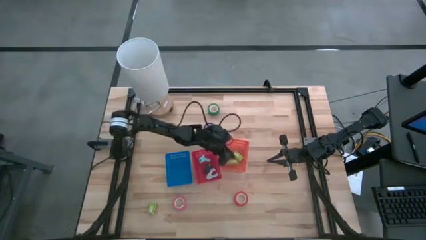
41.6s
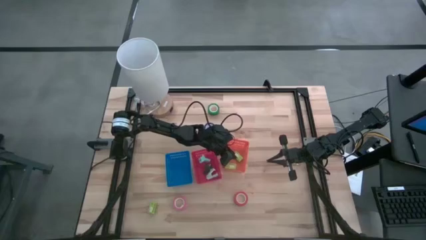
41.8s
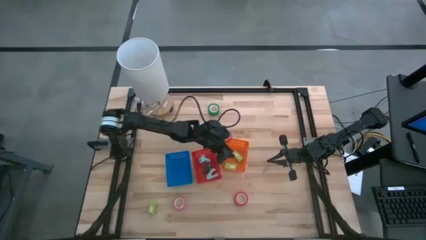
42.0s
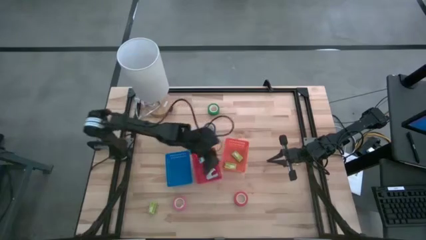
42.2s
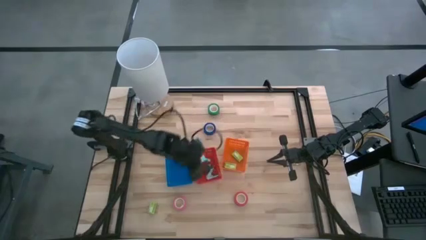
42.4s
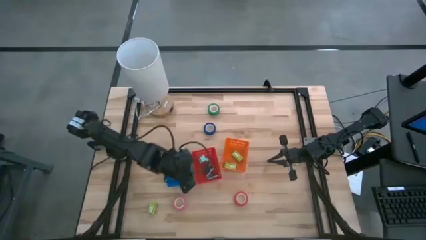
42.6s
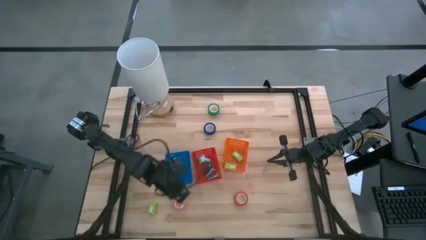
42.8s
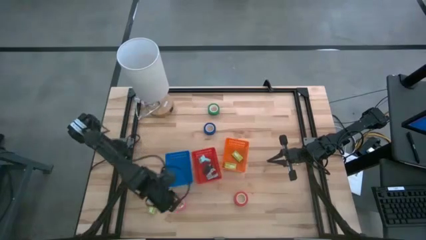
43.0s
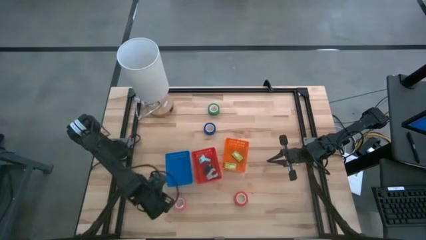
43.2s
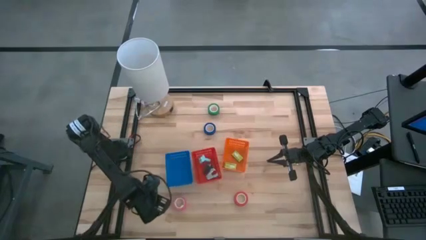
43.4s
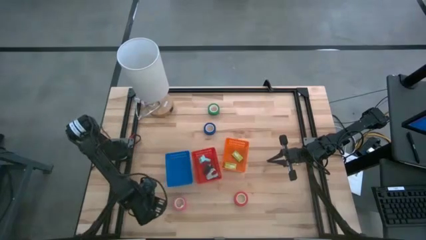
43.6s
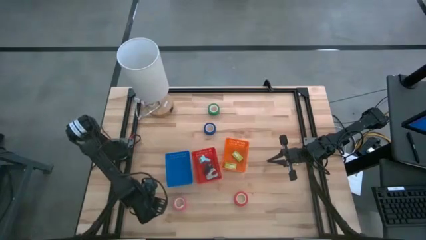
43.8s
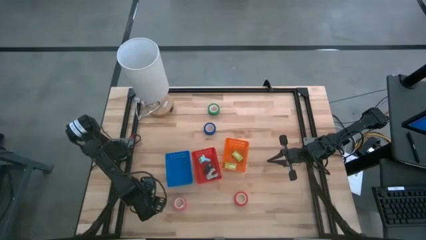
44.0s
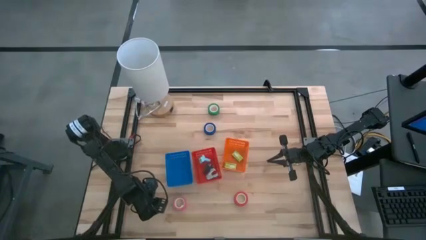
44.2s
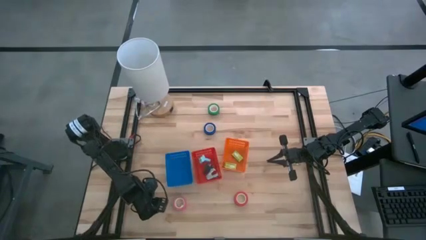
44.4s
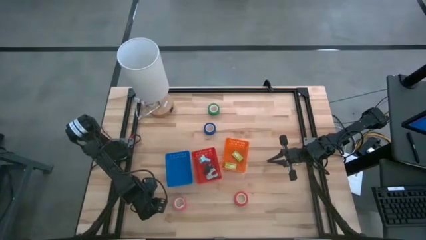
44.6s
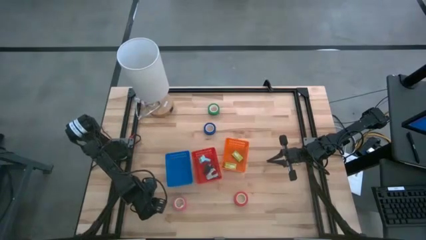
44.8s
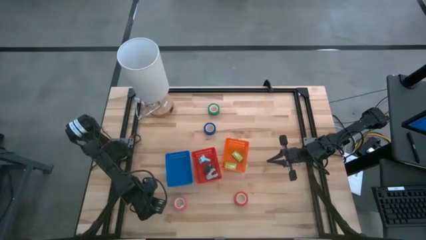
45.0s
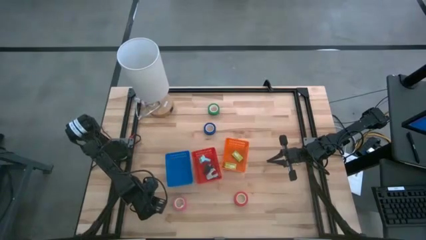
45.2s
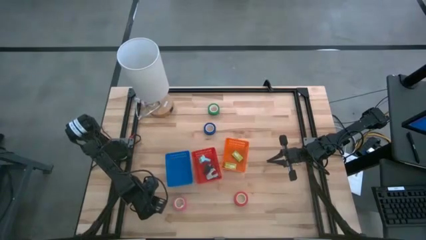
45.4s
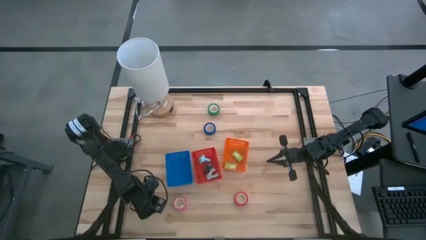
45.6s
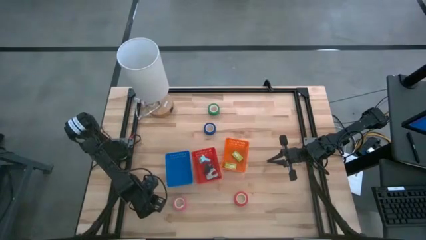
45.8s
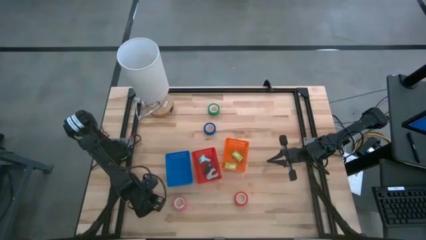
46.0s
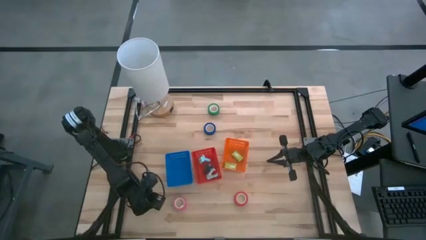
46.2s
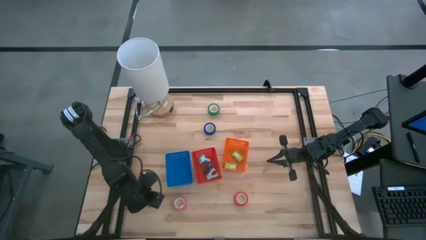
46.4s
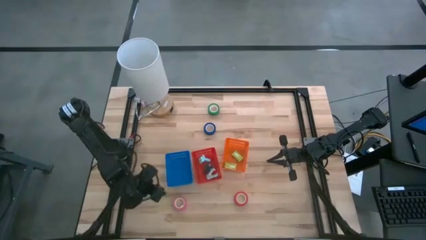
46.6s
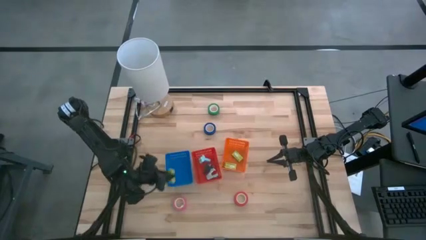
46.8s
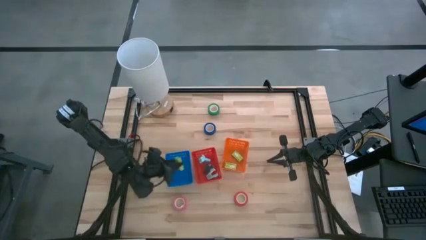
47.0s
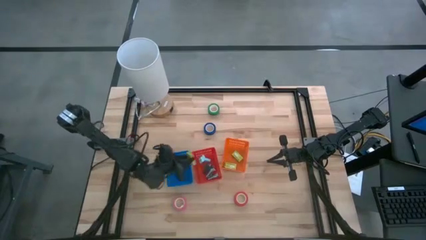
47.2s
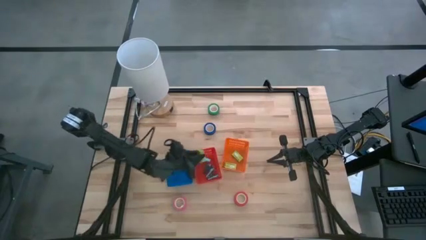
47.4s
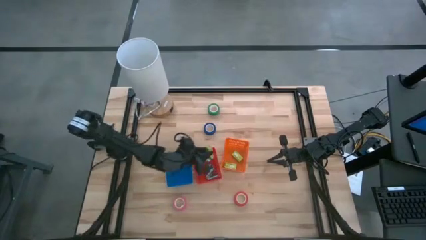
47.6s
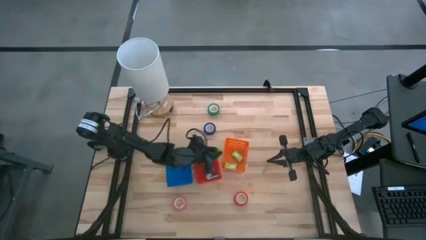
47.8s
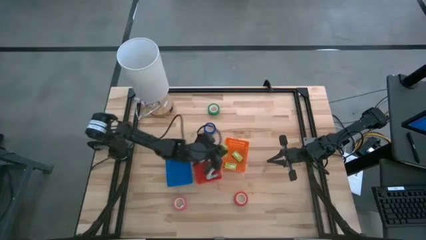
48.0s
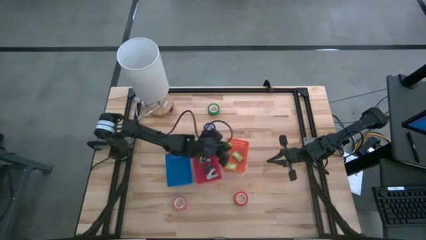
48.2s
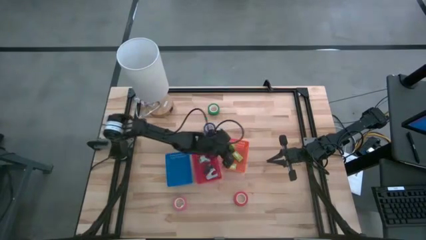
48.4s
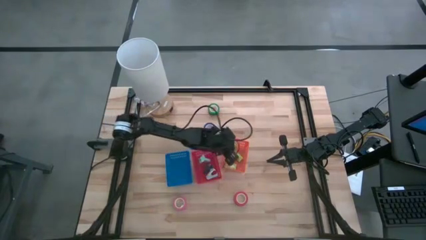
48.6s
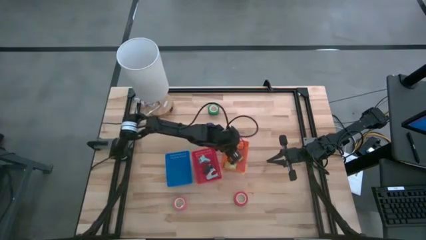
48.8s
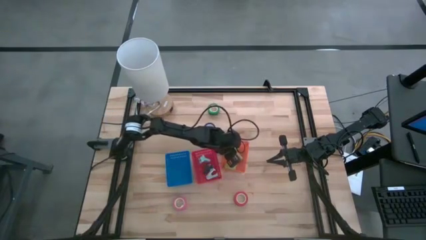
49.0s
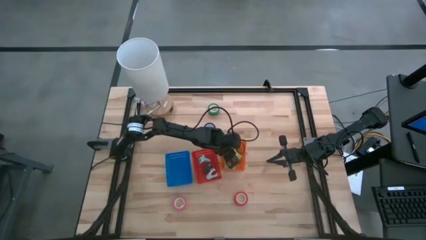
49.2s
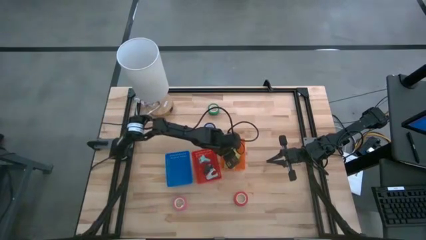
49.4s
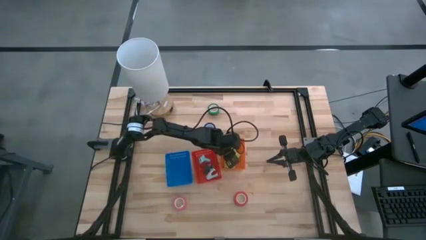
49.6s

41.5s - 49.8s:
Task: Pick and place Stapler, Stapler remover, tape
Put the green staple box into the orange bin

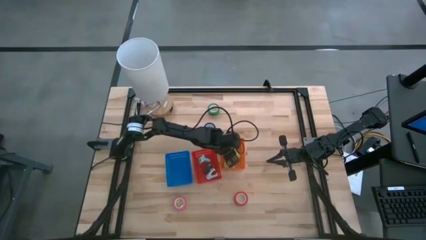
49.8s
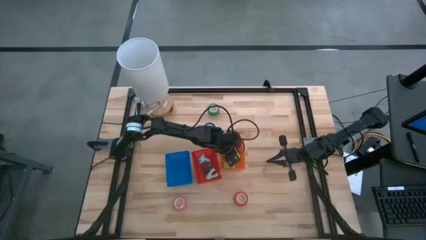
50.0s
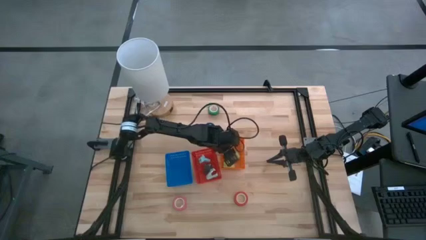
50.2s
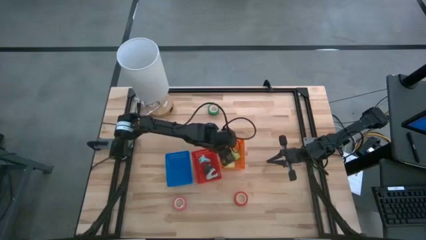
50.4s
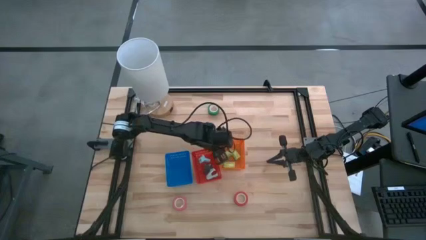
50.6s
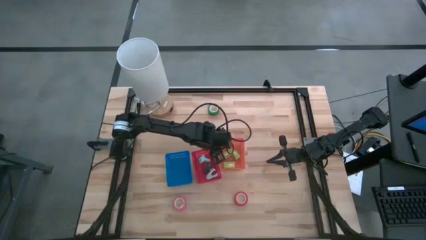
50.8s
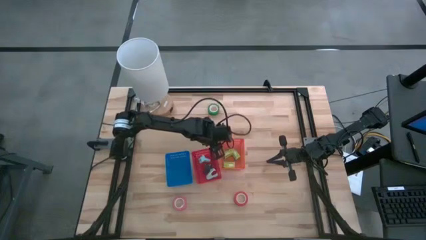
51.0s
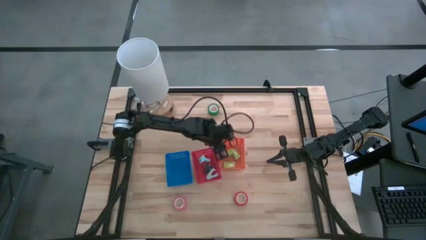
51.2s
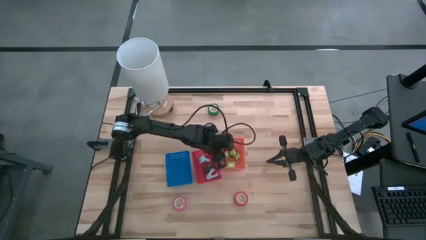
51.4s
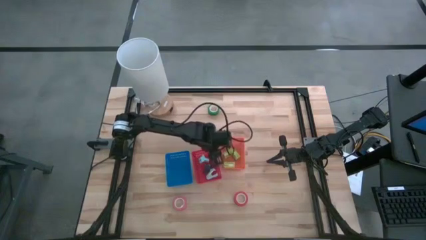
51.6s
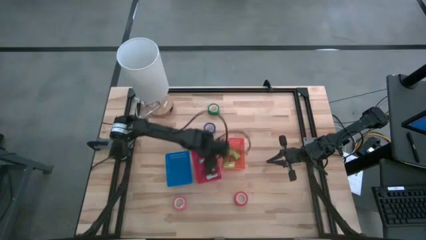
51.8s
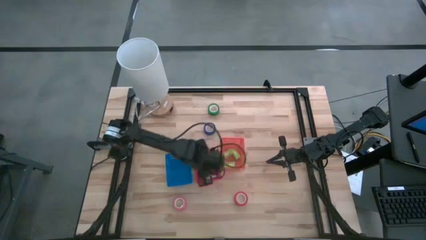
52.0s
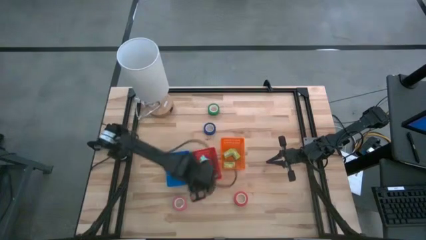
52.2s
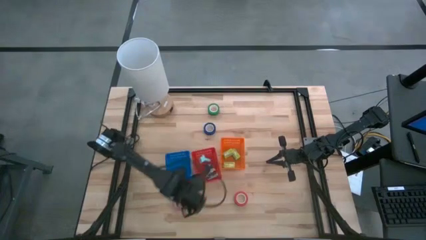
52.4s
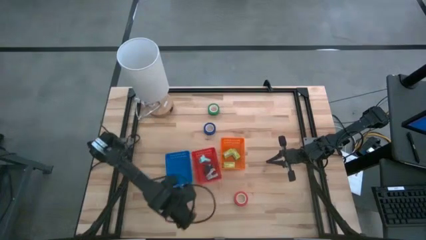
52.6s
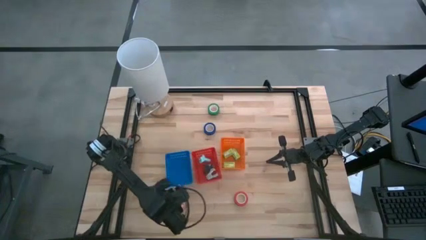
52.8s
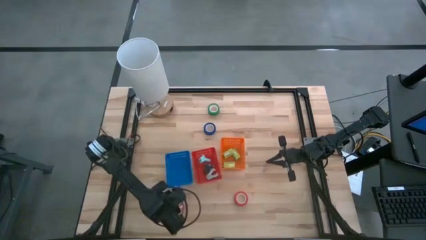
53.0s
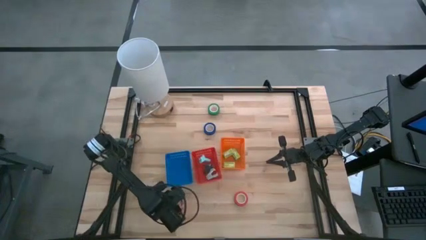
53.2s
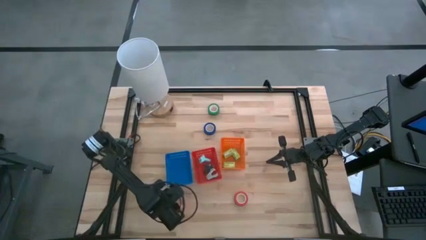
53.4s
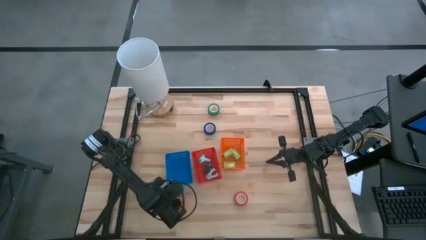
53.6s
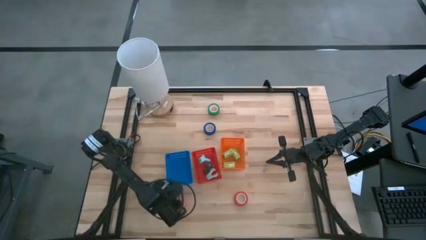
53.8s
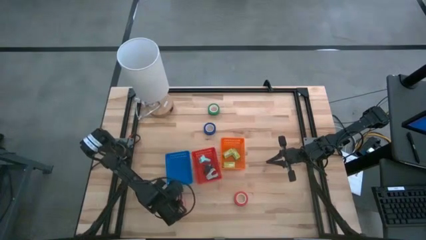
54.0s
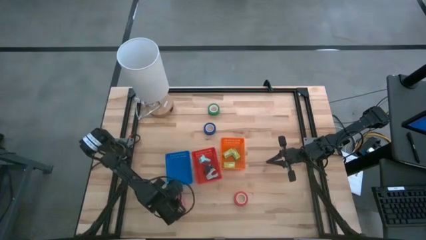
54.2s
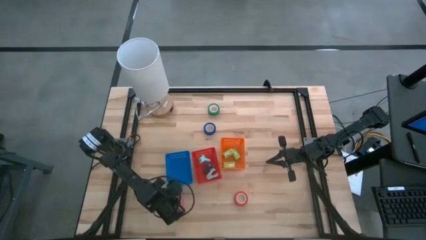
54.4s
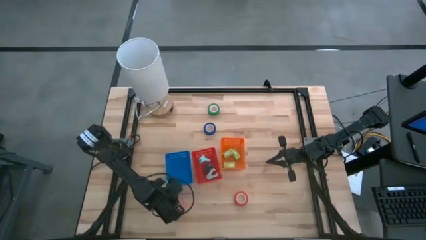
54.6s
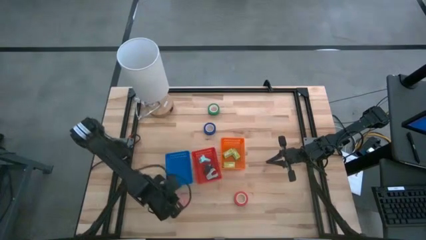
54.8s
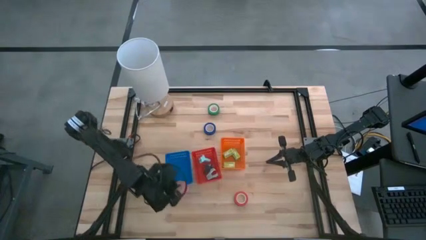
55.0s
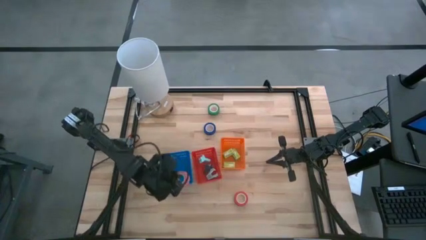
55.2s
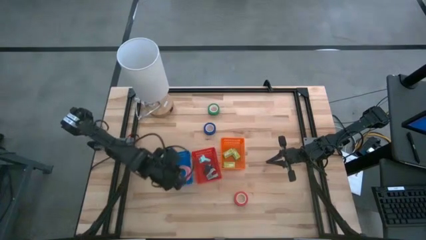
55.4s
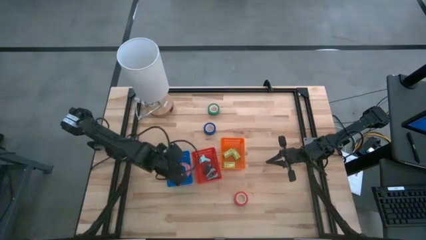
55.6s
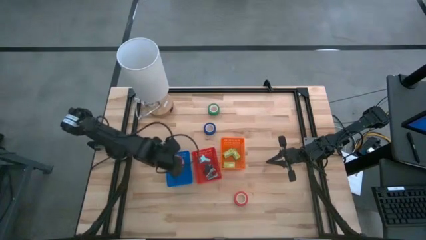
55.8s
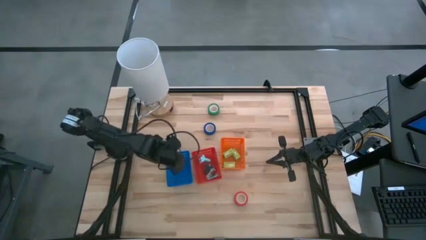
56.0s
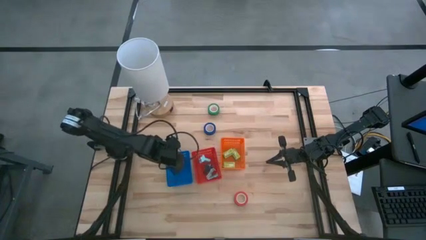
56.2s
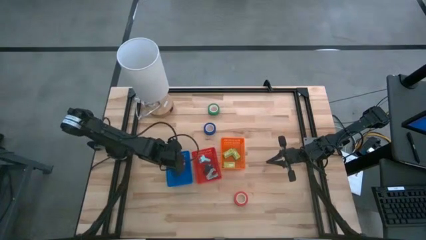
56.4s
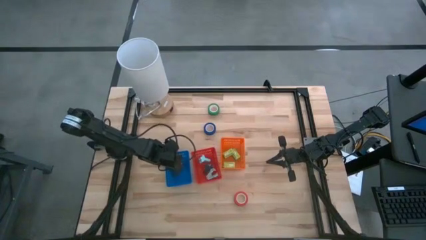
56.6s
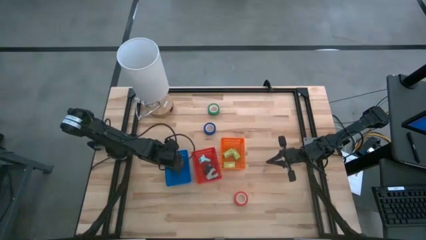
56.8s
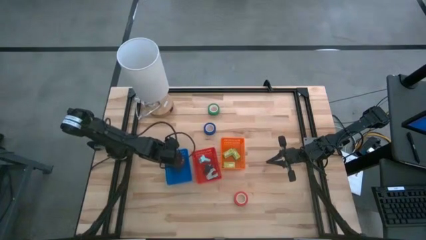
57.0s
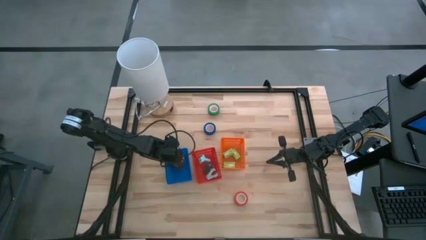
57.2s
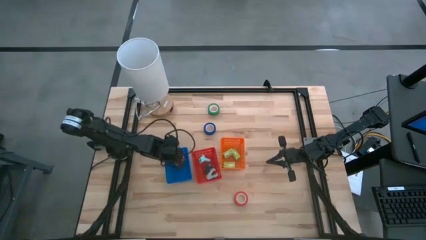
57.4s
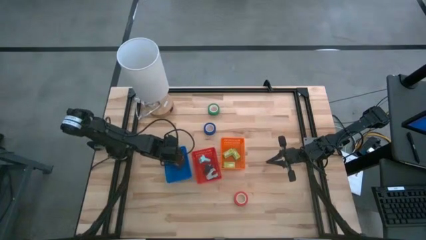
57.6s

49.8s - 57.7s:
Put the pink tape into the blue bin

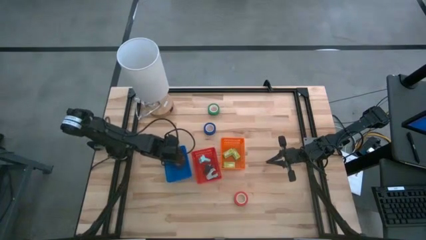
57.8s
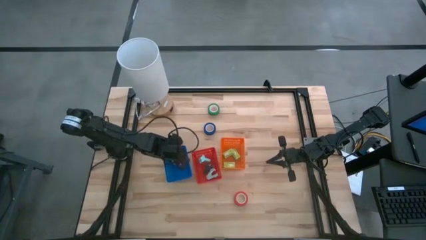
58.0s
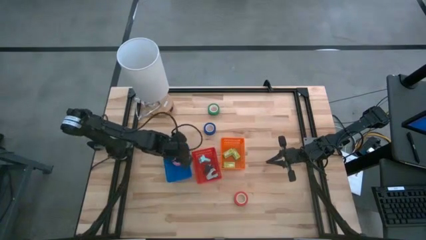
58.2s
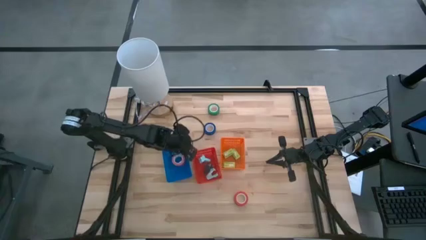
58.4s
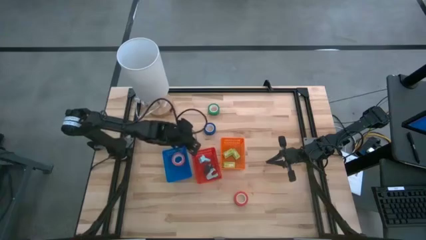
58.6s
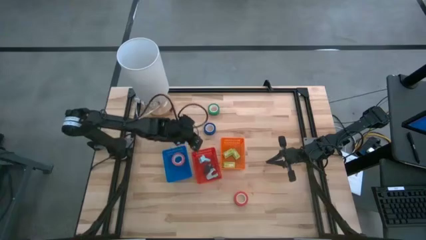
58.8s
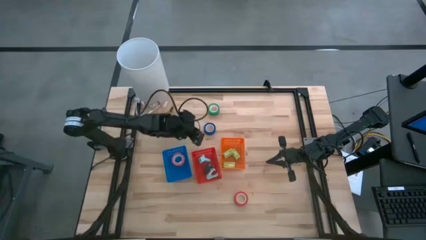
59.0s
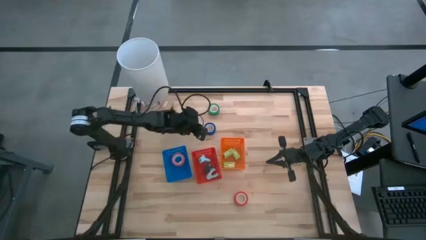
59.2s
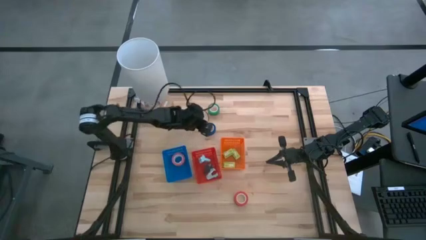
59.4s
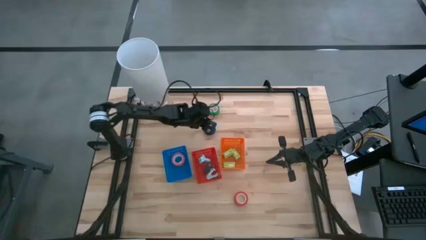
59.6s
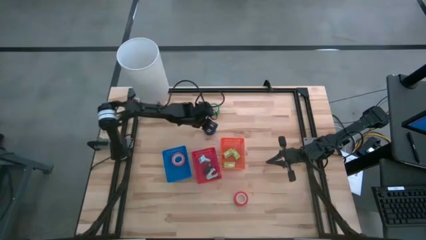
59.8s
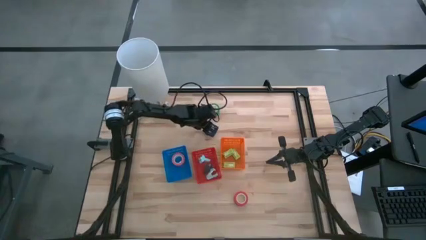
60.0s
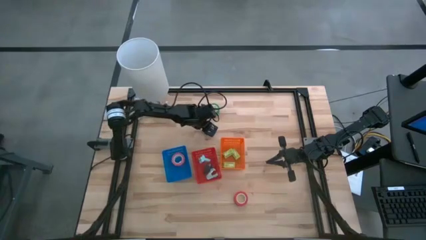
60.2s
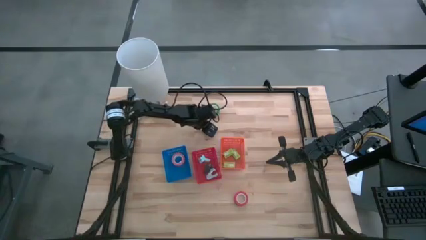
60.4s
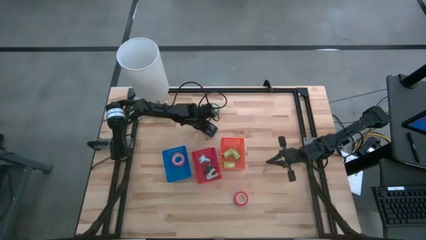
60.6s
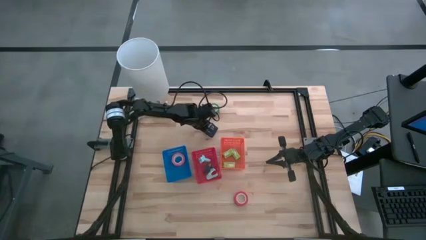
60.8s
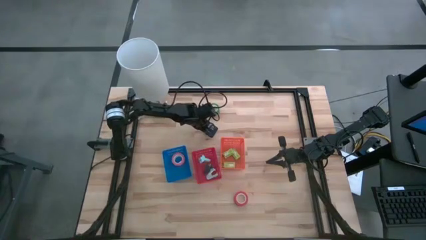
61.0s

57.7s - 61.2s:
Put the blue tape into the blue bin
